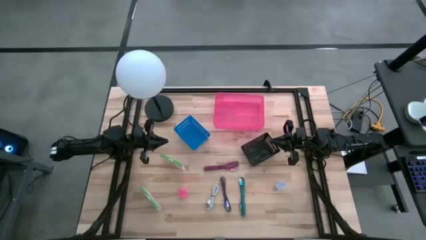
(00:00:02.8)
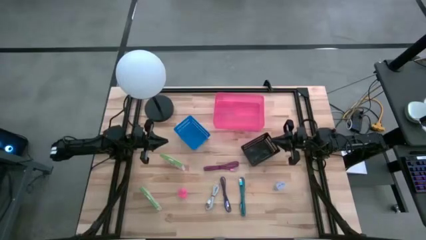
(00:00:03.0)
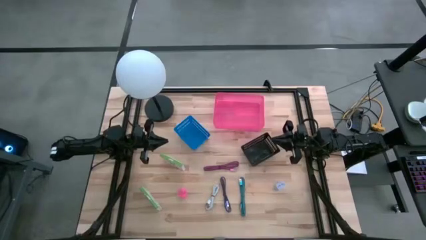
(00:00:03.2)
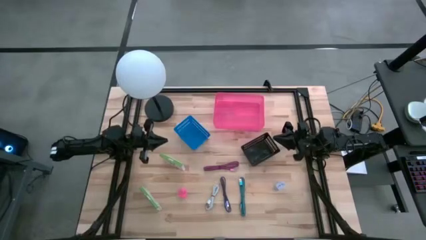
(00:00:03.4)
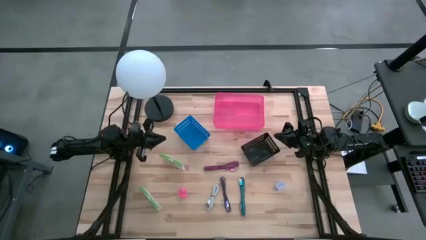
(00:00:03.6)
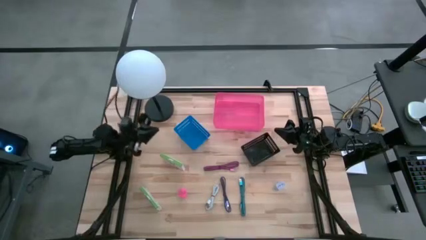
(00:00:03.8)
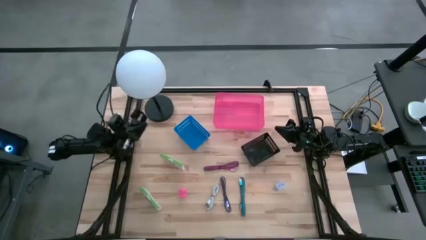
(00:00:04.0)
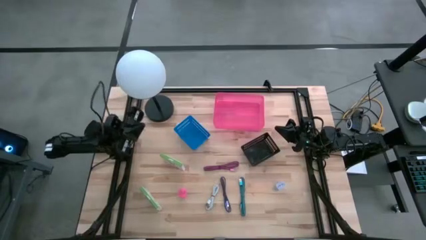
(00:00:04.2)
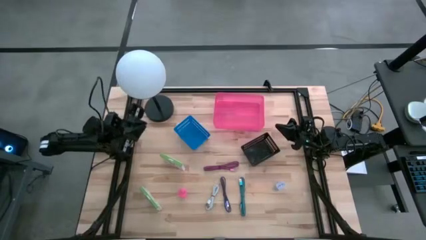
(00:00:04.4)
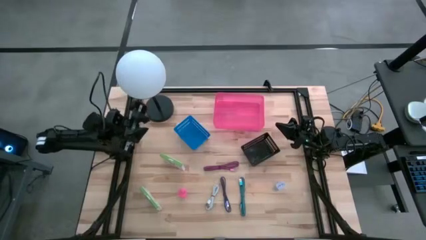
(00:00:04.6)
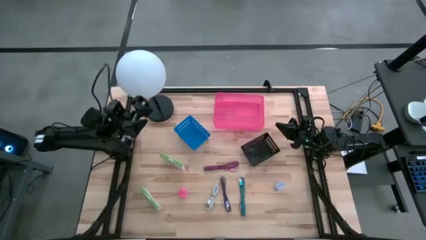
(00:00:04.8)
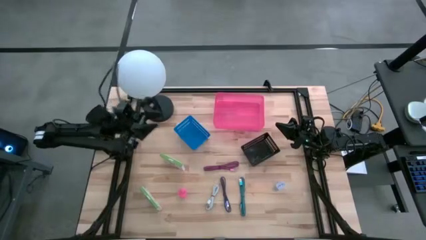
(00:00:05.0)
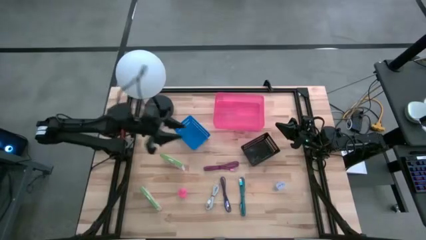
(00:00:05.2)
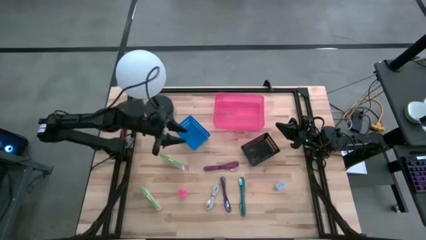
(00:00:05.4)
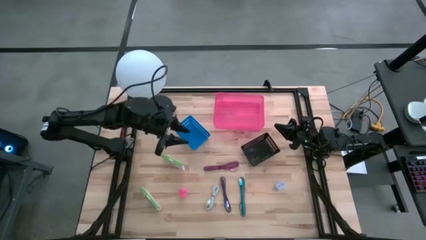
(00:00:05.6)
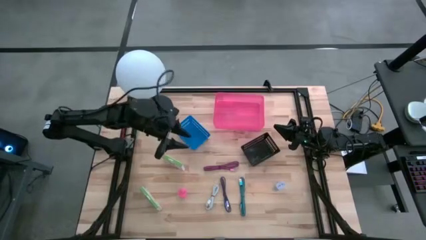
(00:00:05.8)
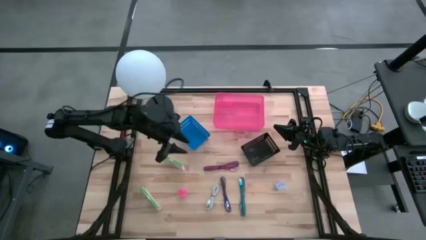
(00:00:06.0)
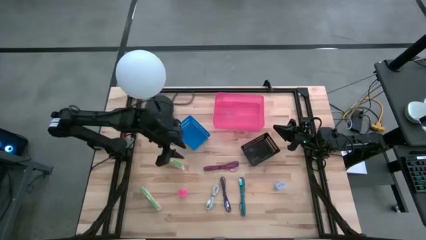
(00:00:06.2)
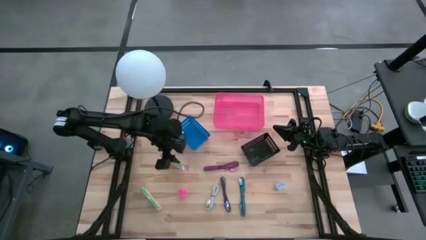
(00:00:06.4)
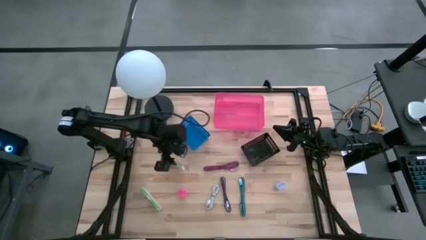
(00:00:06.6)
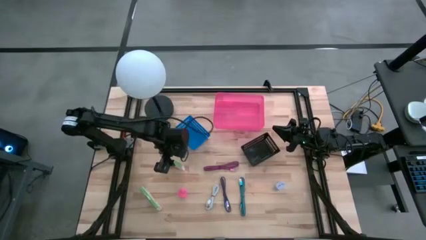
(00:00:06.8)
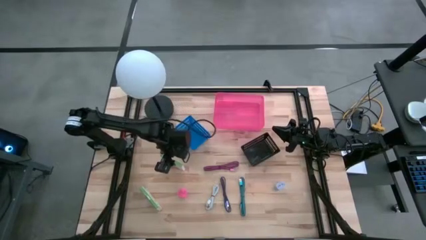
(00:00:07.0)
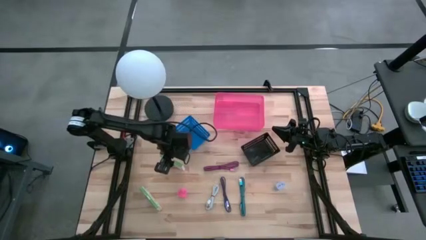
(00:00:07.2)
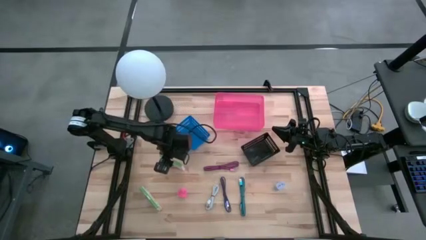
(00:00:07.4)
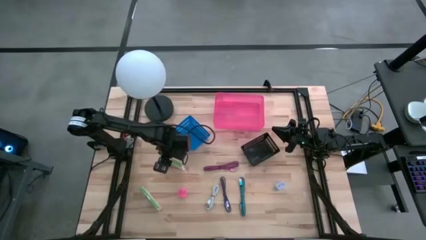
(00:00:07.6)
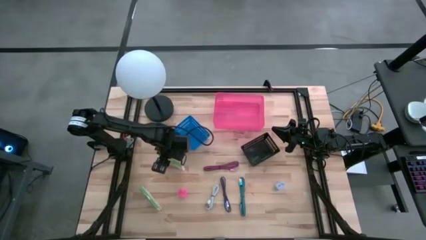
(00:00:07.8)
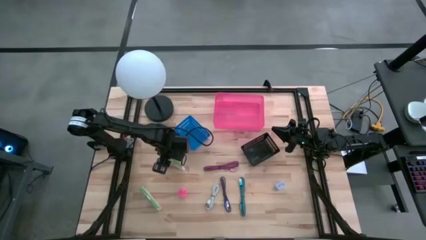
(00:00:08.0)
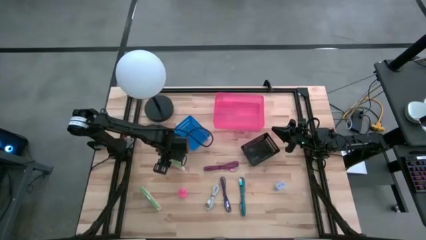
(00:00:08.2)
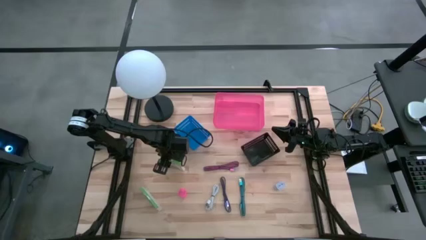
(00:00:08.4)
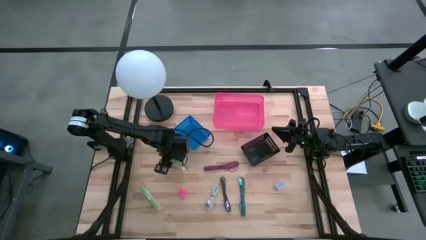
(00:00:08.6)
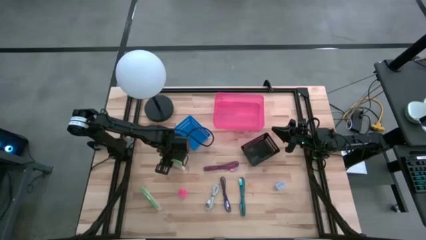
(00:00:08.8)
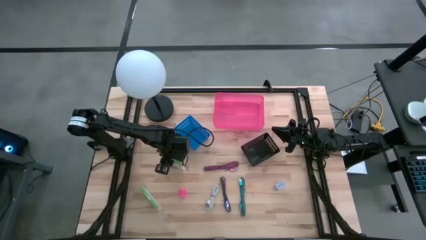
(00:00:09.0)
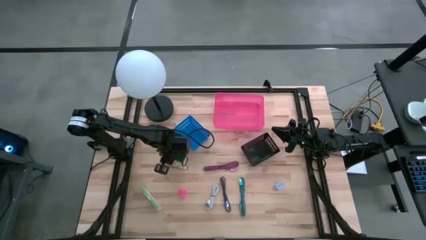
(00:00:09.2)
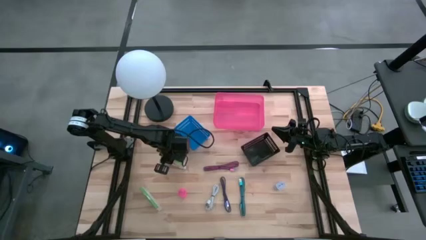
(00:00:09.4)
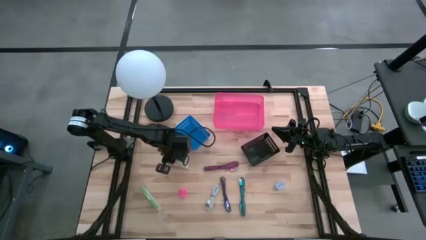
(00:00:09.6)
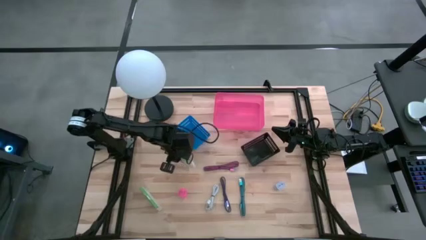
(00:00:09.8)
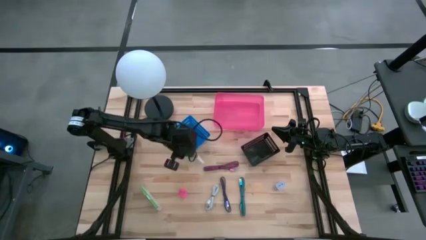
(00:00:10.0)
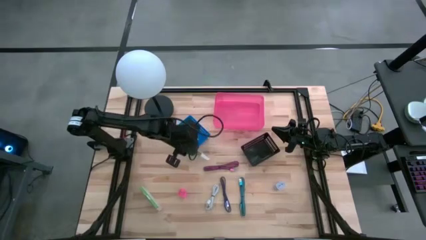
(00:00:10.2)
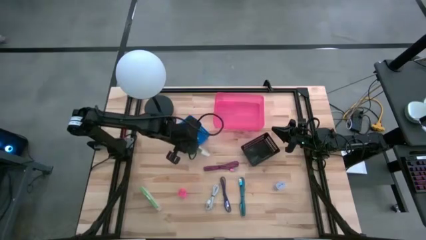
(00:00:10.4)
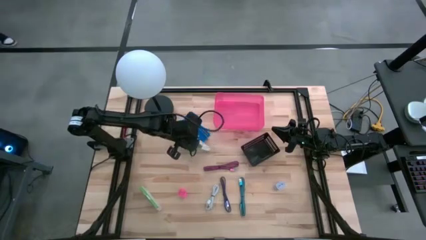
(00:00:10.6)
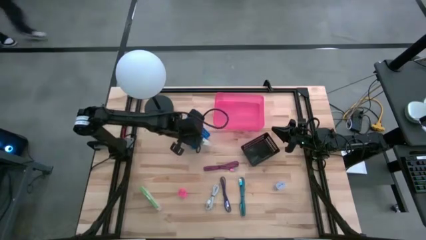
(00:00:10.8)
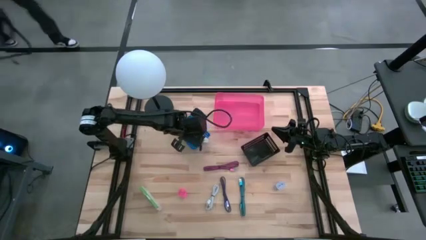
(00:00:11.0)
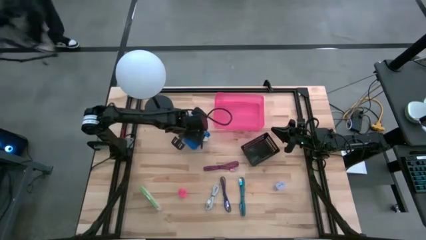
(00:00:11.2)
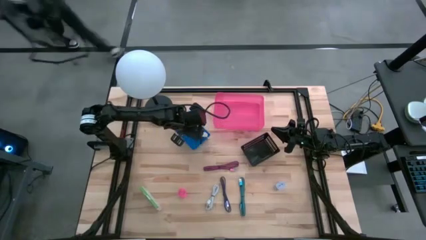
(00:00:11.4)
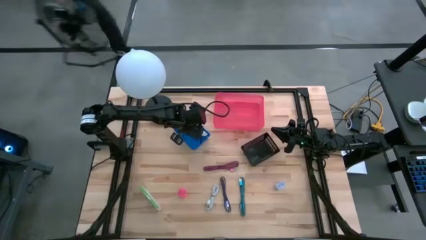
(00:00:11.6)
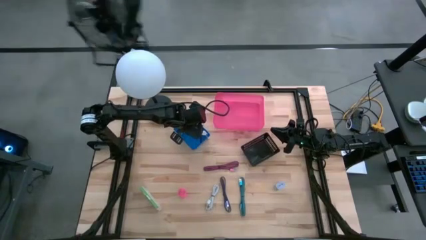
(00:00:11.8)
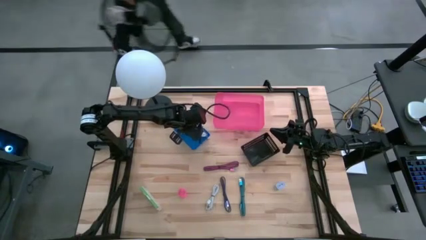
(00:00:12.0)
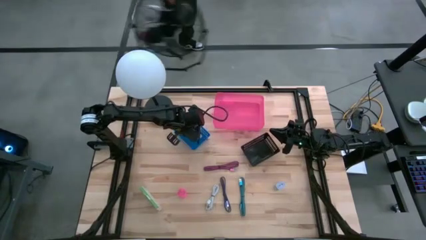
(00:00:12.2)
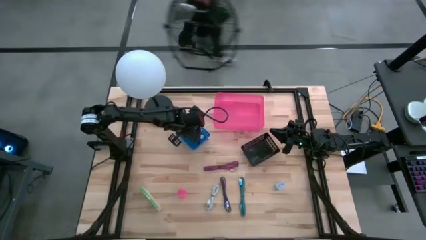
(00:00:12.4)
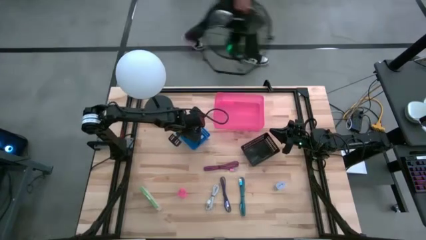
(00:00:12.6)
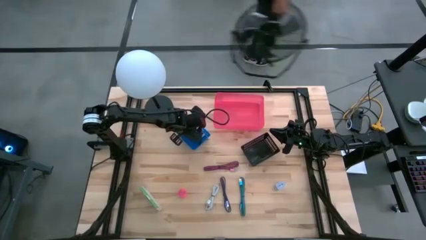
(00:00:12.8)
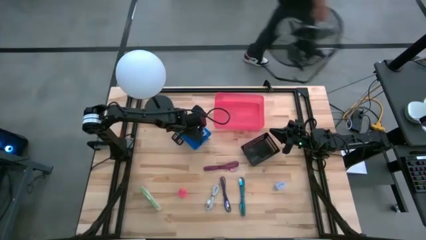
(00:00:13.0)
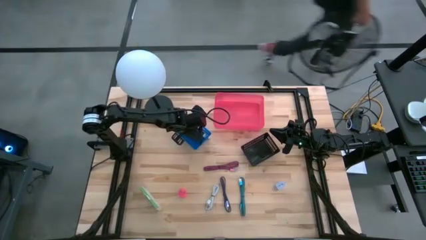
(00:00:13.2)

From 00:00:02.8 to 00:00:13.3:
Task: Pick and place items into bin
Put the top white card reader box into the blue bin
